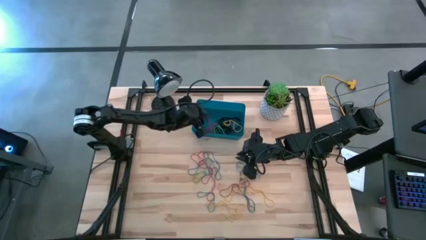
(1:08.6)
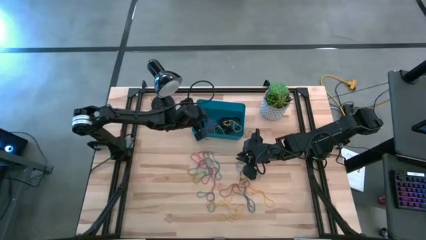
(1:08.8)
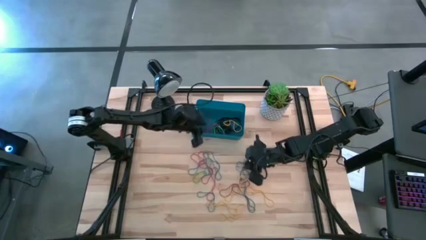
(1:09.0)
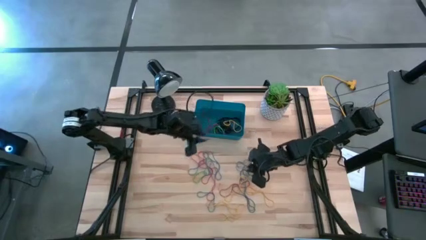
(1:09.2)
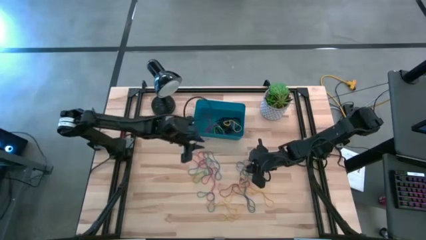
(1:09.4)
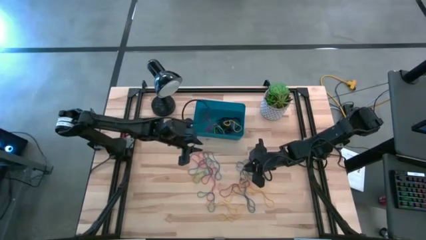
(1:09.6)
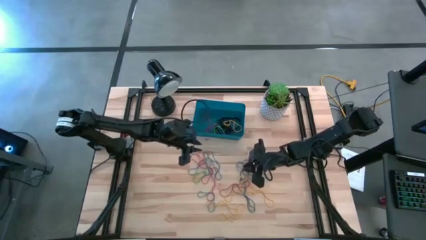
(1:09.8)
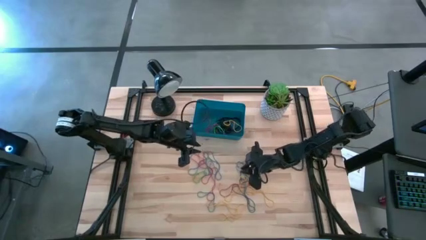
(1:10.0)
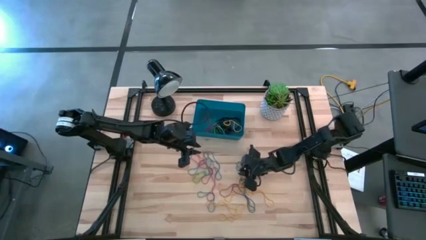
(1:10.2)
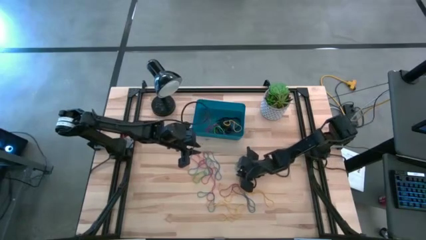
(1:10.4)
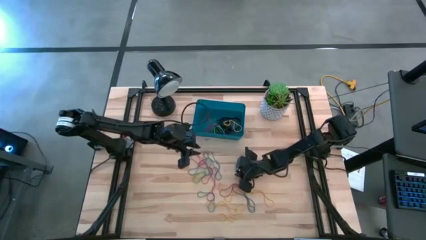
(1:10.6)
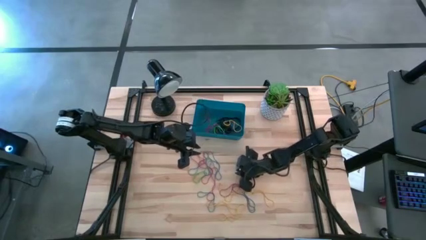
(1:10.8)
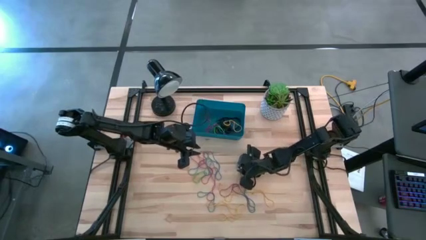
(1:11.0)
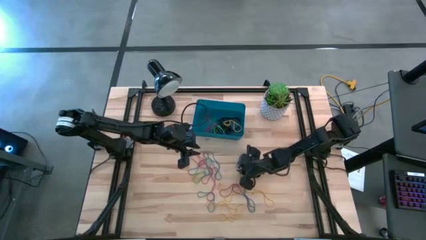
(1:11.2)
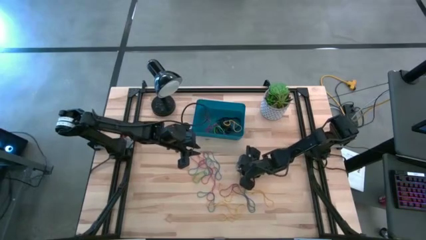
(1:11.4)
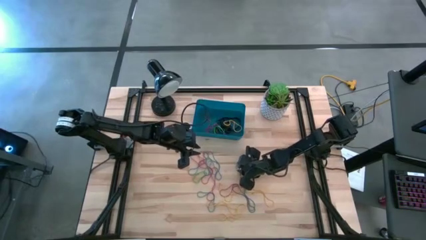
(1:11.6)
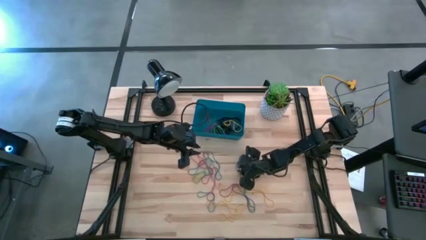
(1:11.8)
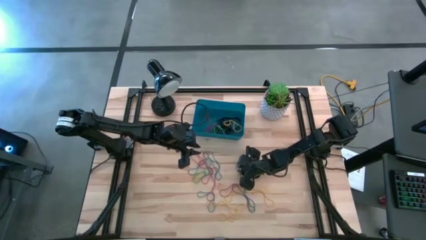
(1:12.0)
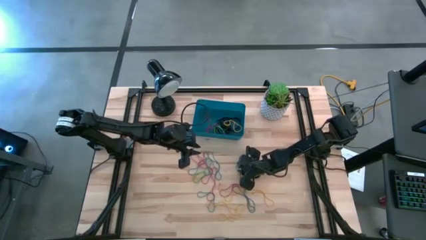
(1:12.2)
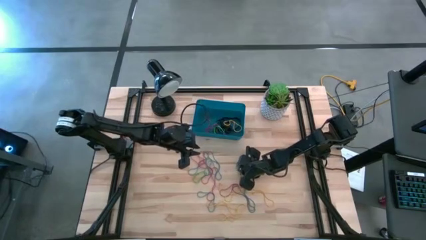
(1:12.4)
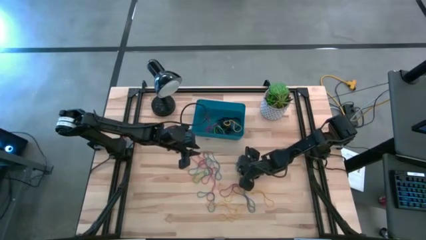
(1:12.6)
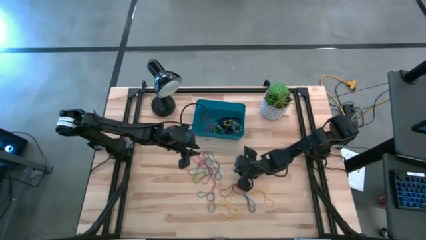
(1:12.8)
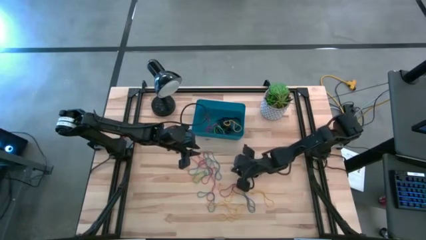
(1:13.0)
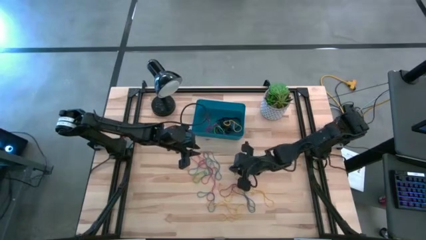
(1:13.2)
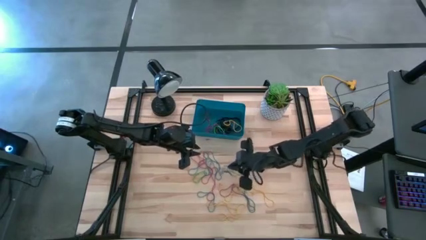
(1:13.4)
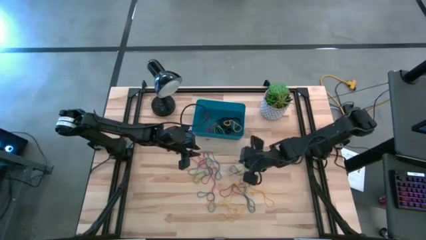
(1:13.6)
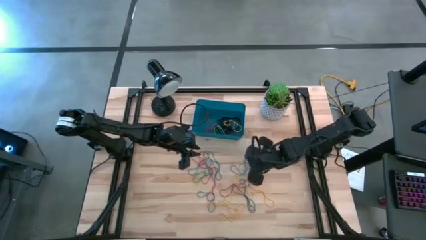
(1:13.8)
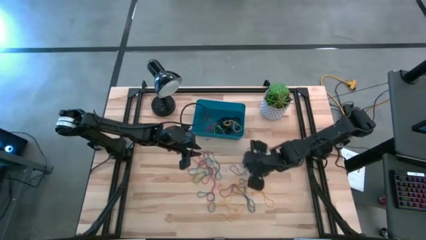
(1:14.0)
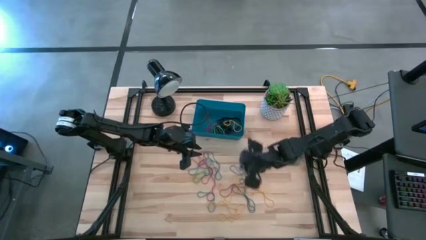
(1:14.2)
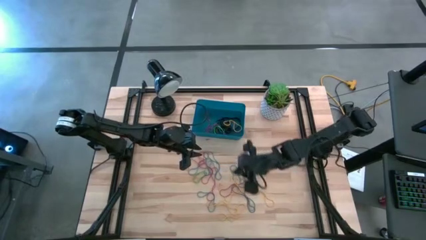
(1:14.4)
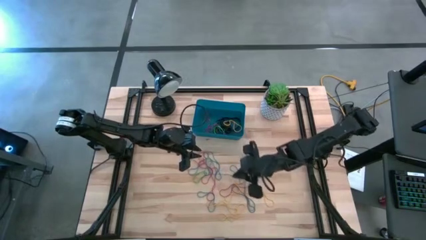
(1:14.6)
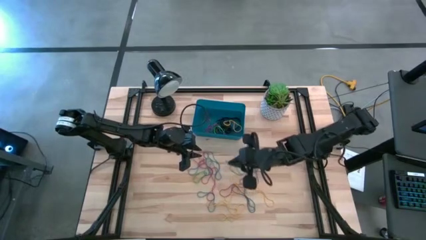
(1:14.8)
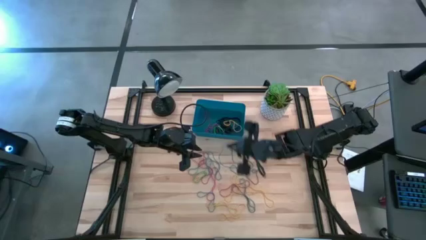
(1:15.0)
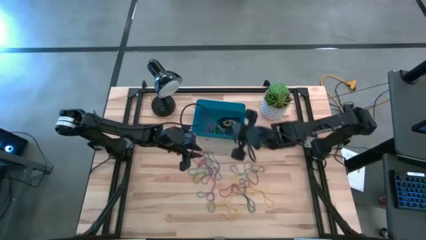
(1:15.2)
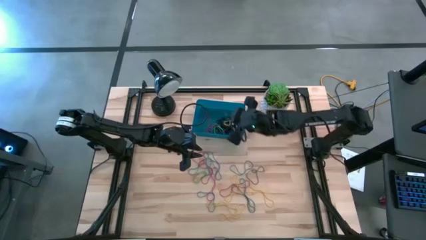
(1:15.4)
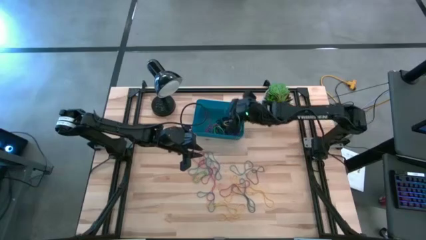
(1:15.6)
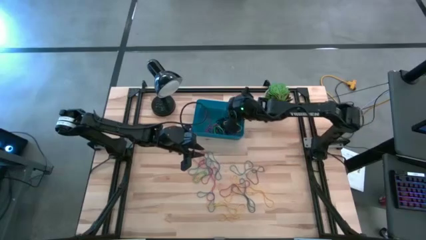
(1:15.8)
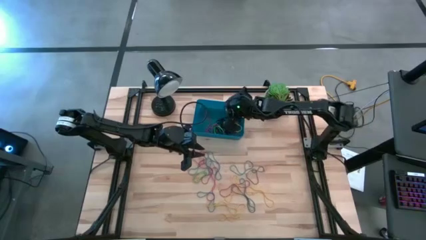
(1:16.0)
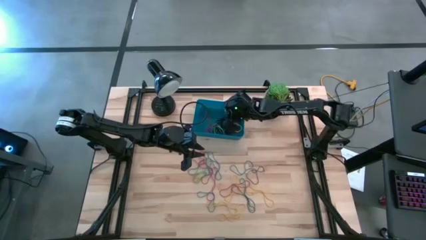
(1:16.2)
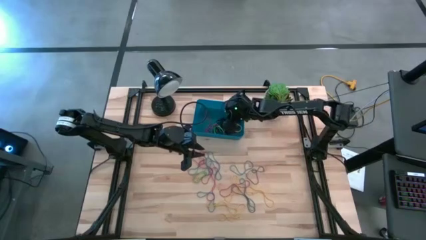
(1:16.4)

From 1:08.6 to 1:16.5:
Task: Pick and place rubber bands into bin
Put the blue rubber band into the blue bin

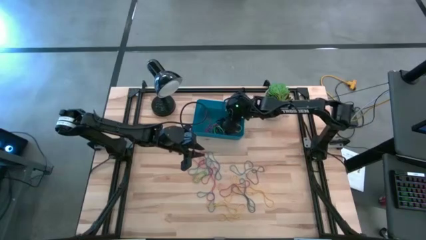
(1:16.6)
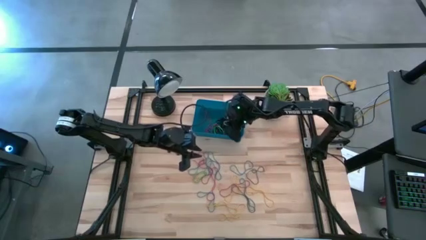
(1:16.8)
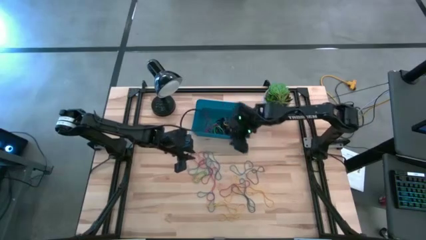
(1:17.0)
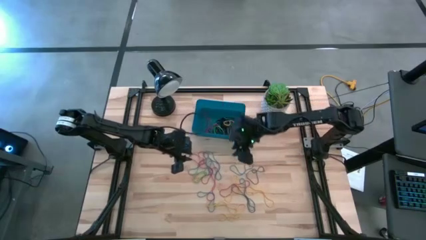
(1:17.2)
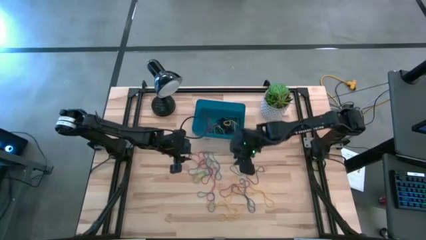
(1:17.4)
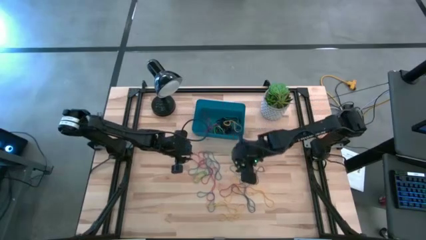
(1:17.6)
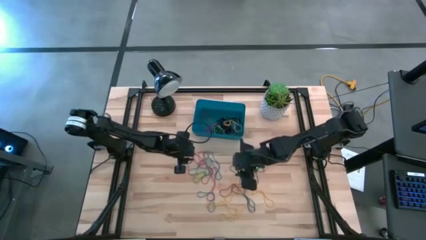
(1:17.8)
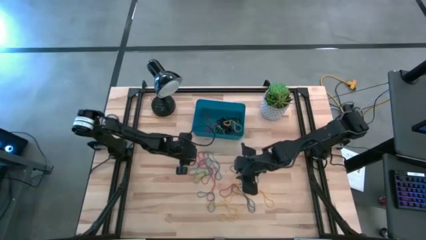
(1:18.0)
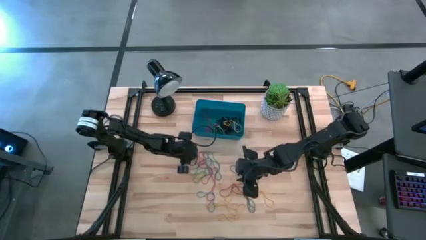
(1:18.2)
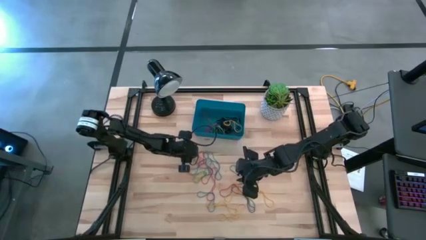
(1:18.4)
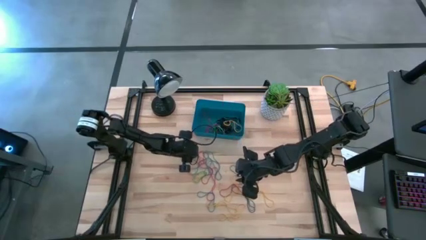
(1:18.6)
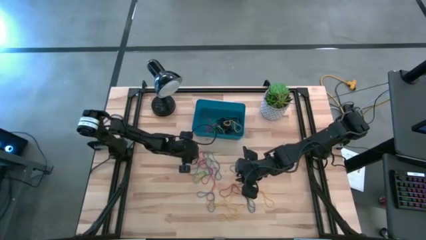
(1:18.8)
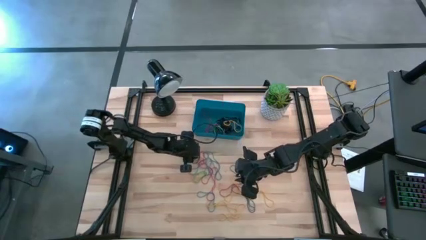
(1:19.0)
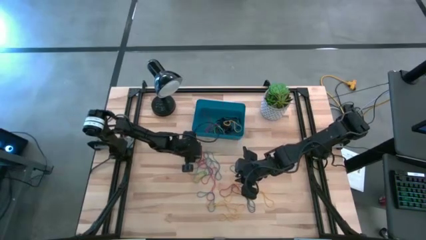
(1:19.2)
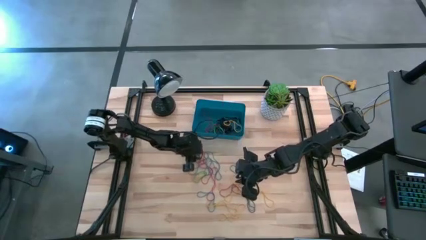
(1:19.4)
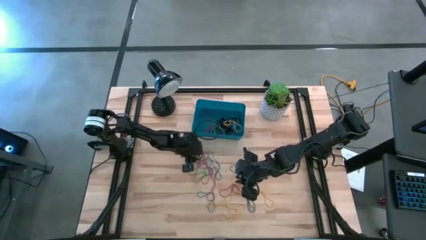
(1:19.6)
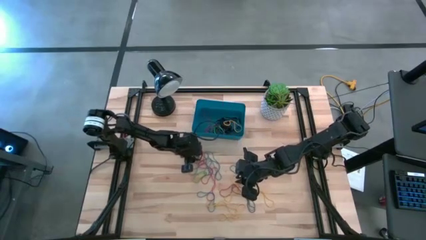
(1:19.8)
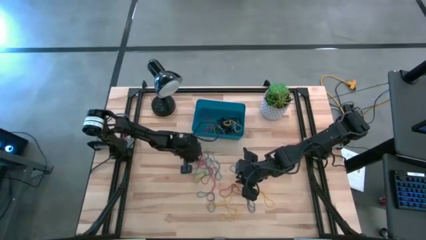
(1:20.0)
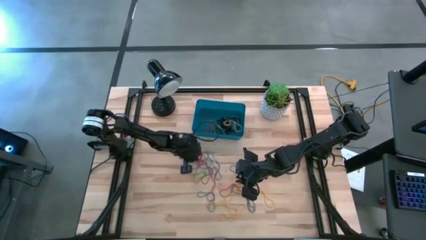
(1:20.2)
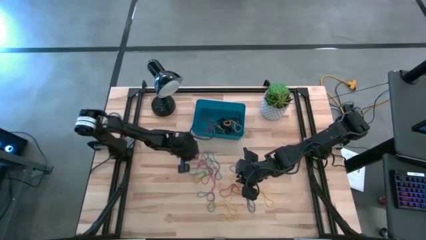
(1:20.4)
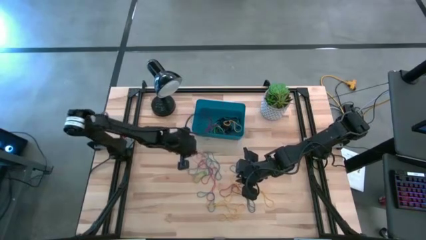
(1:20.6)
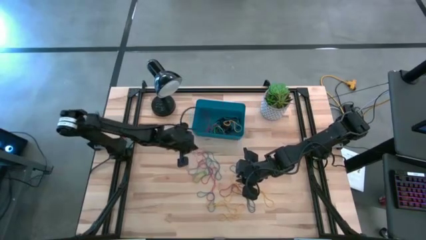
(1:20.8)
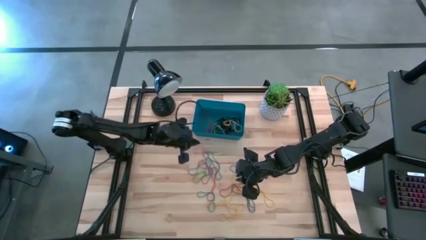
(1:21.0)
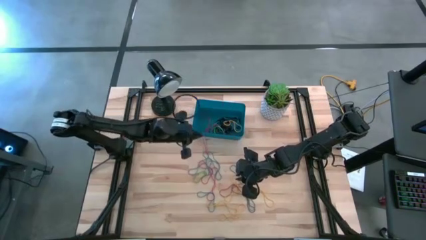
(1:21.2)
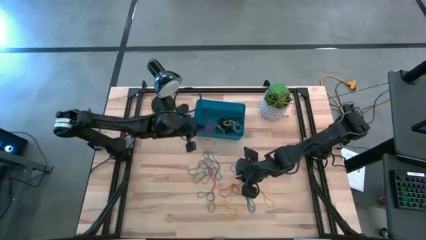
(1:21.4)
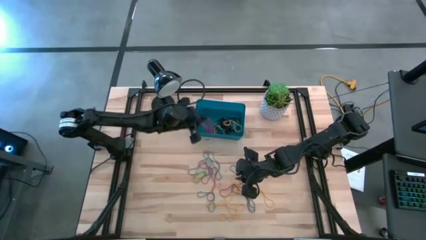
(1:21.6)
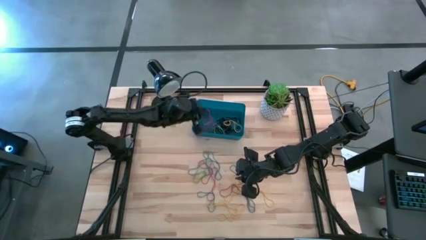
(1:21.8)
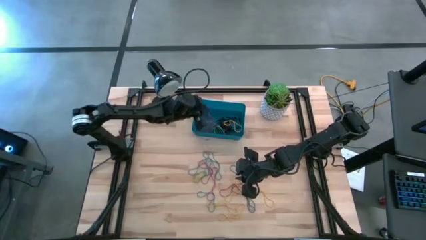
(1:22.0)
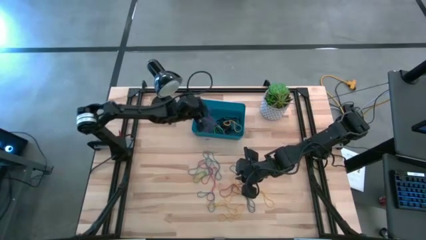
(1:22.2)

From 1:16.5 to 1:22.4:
Put the red rubber band into the blue bin
